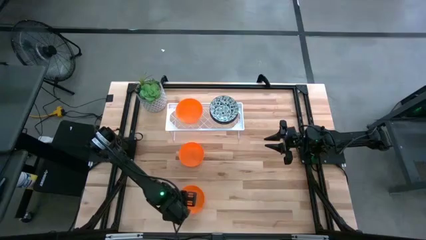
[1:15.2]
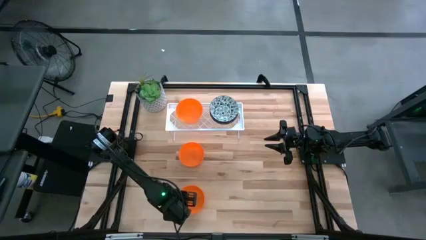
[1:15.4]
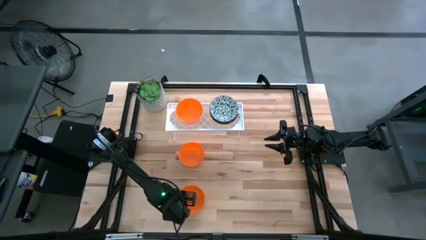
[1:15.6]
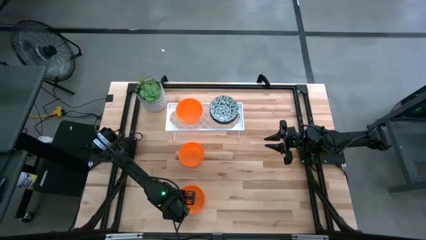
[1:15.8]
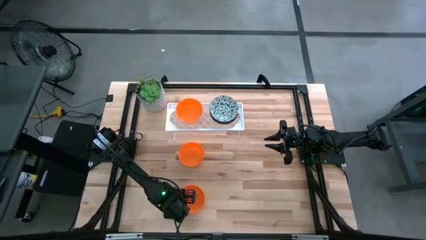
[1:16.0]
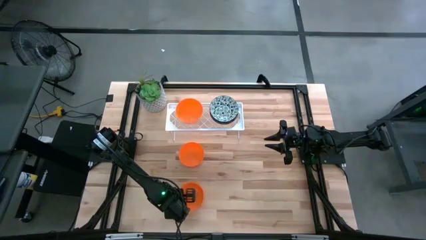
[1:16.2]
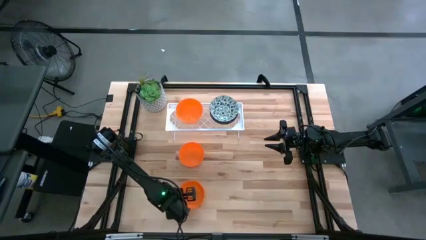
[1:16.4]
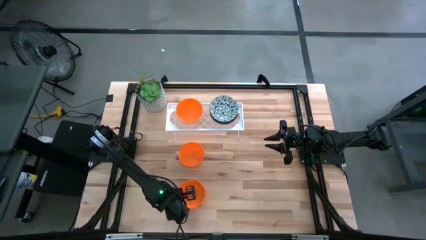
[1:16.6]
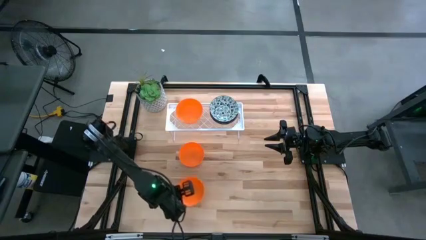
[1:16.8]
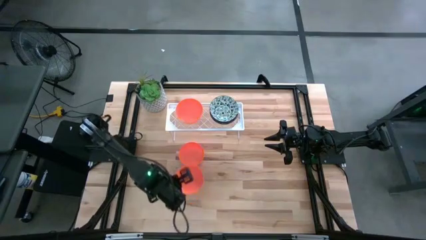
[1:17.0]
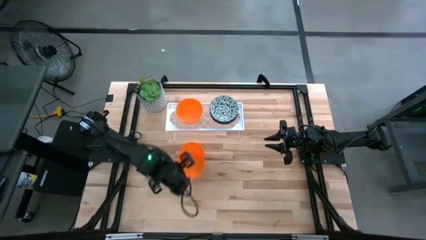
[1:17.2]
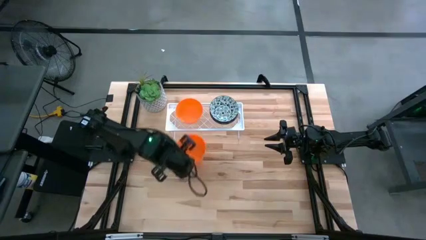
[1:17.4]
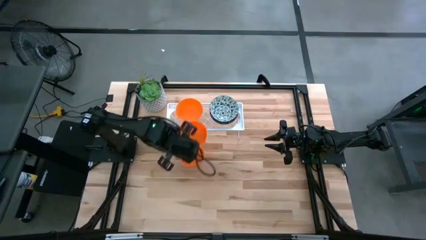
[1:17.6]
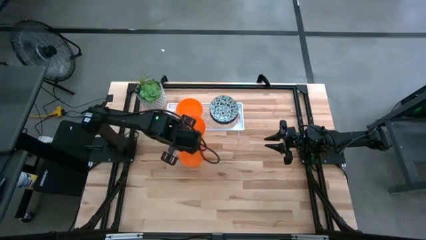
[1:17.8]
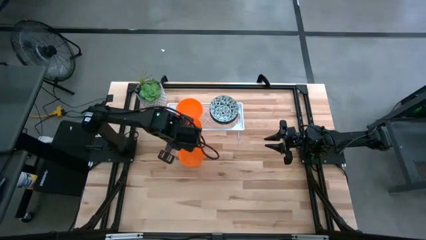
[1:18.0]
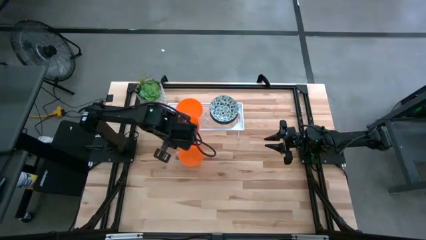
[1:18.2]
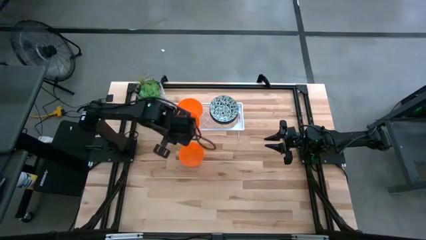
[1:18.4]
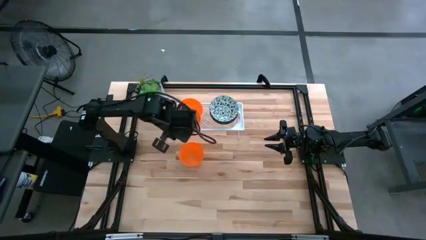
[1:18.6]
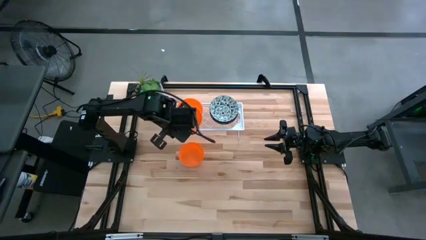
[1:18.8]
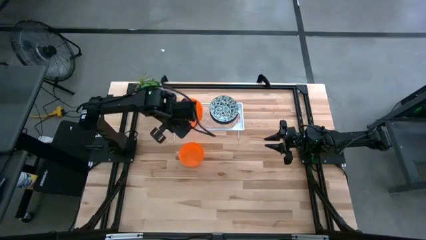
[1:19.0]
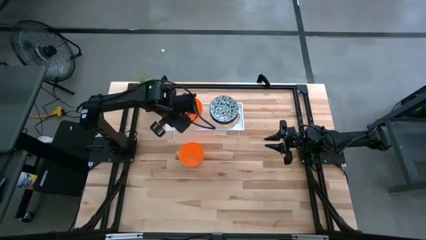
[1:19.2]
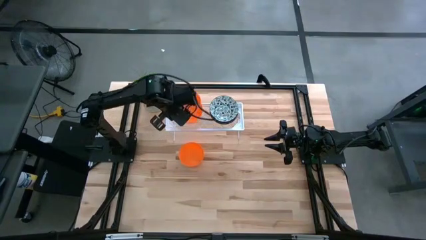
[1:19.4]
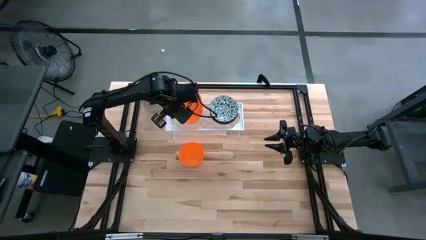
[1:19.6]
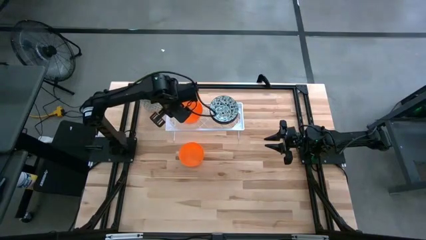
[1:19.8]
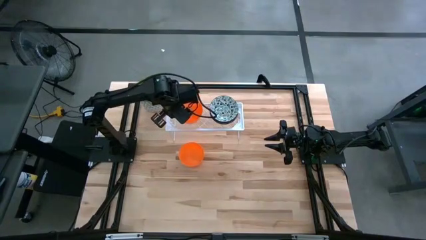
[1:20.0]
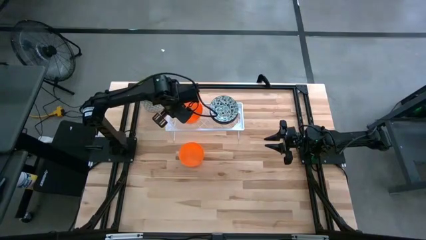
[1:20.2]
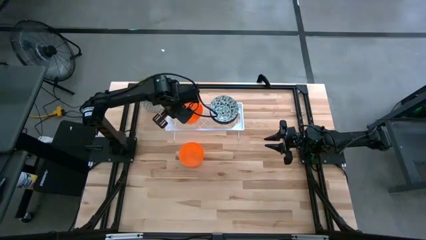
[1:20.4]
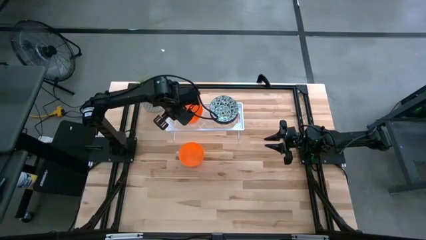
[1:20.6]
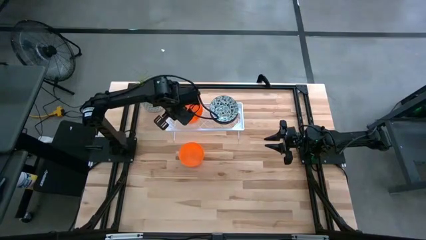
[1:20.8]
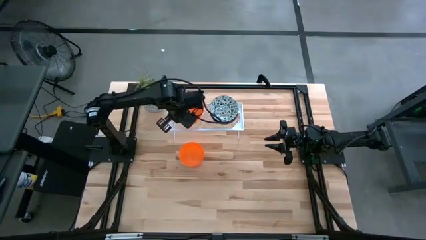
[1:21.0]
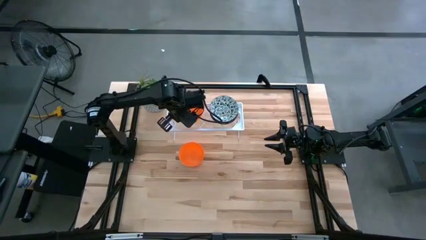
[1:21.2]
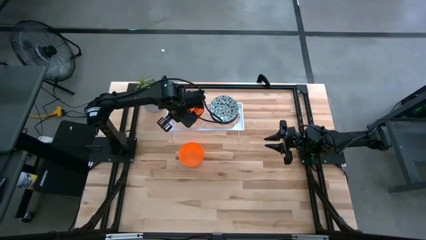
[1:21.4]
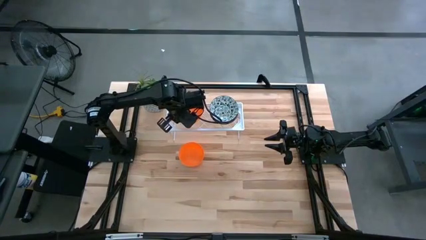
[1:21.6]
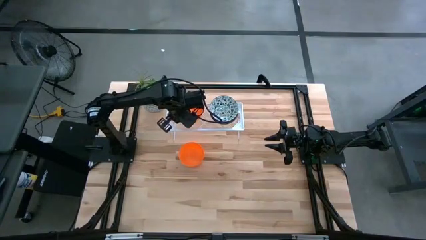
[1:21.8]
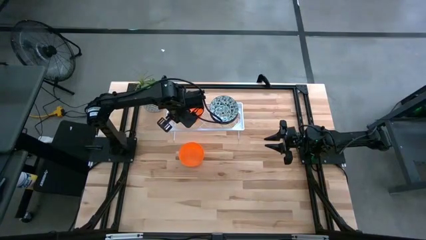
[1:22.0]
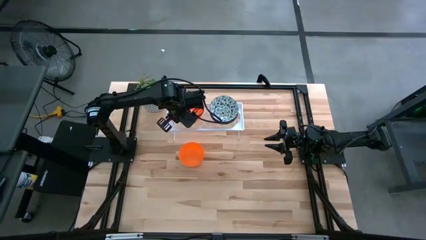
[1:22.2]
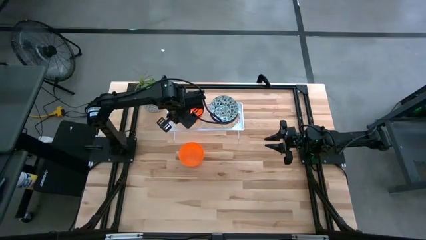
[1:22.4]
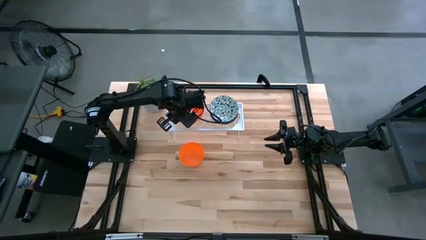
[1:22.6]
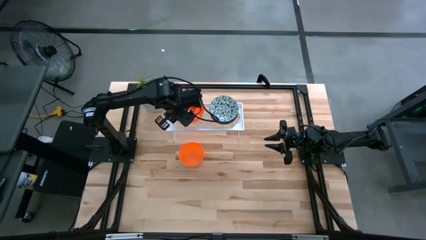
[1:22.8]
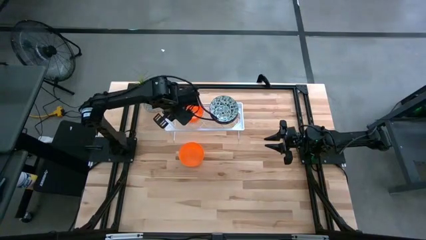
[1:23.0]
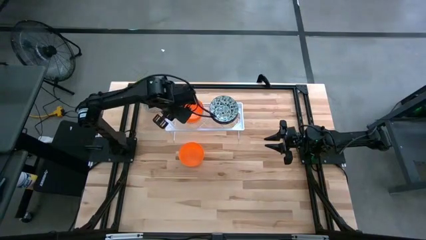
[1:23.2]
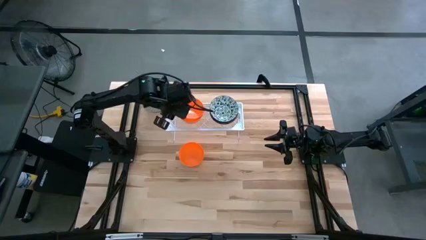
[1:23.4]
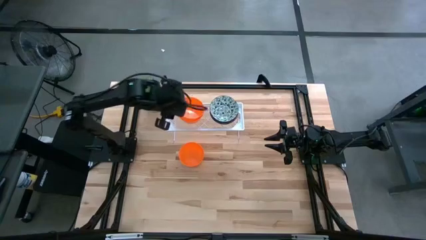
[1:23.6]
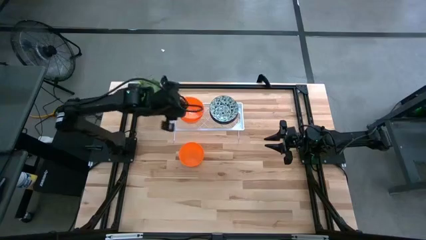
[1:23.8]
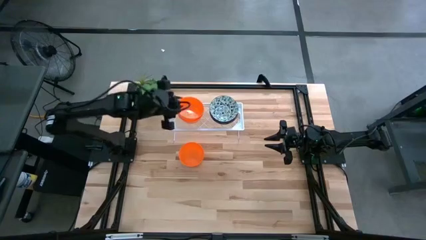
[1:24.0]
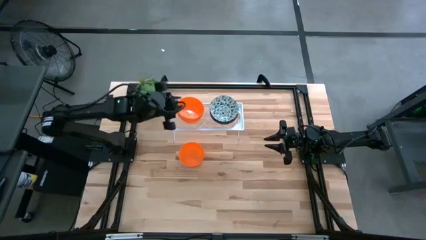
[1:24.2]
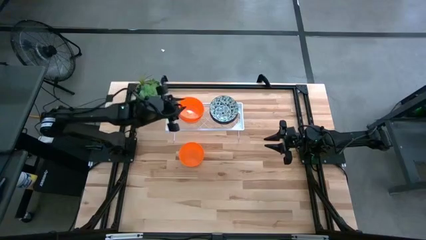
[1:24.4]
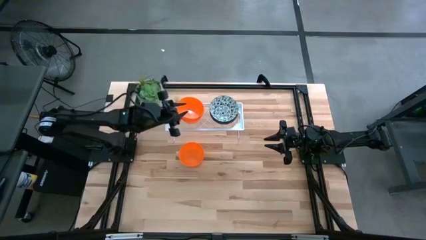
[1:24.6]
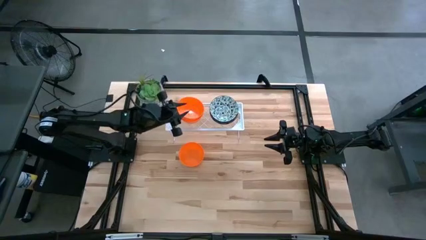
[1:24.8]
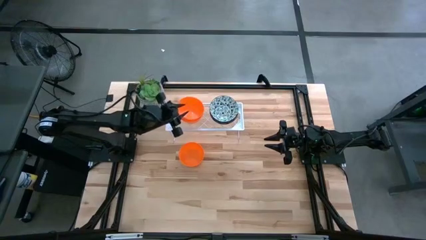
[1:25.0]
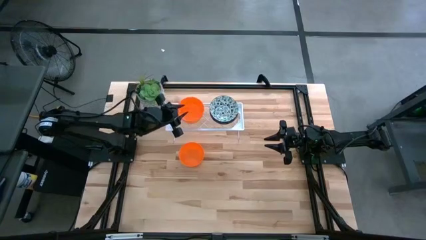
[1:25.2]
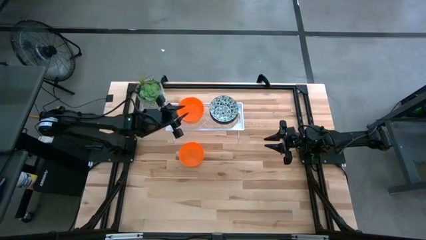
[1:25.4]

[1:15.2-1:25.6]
Task: Pick & Place Mini bowls
Stack the bottom orange bowl on the orange bowl on the shelf
